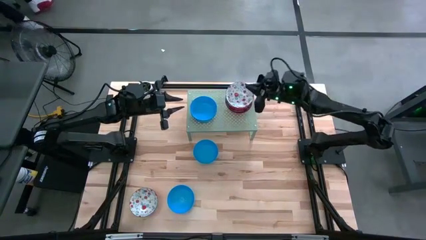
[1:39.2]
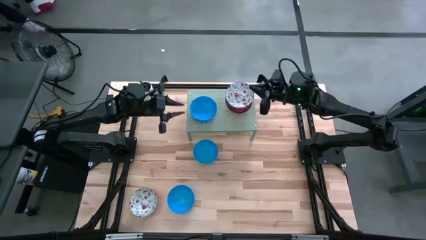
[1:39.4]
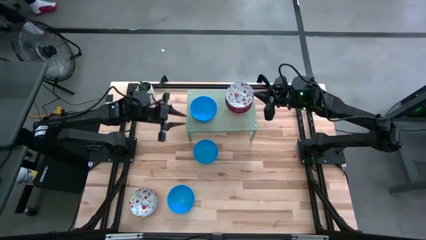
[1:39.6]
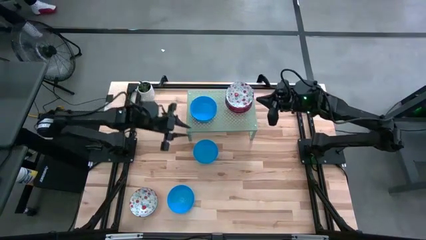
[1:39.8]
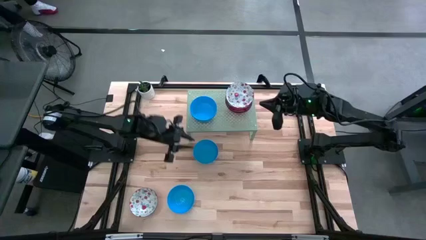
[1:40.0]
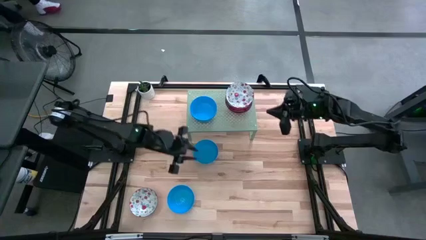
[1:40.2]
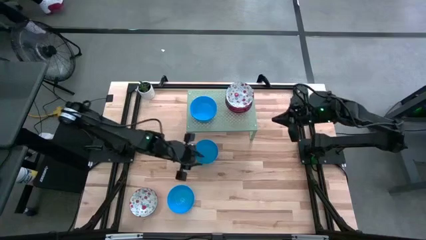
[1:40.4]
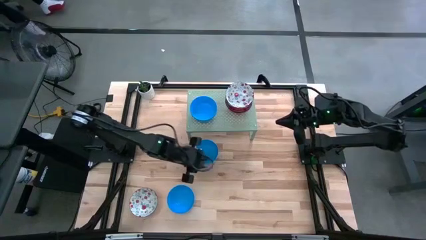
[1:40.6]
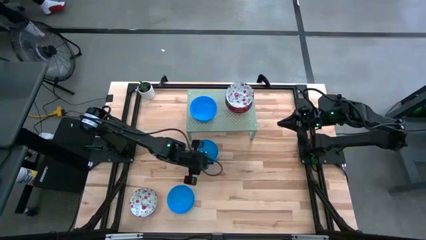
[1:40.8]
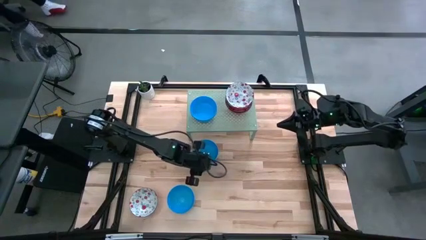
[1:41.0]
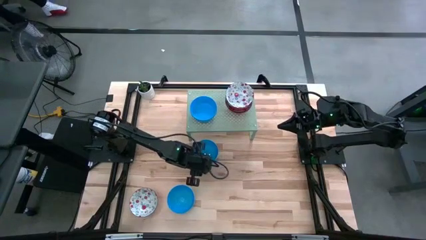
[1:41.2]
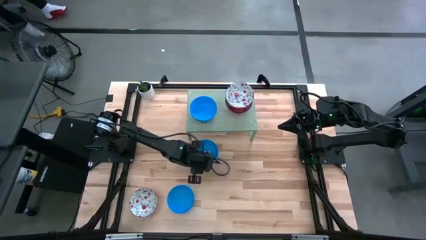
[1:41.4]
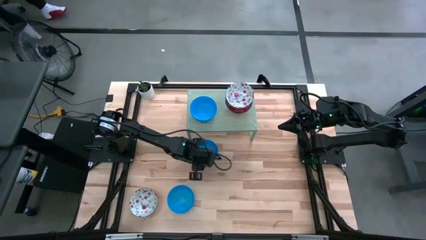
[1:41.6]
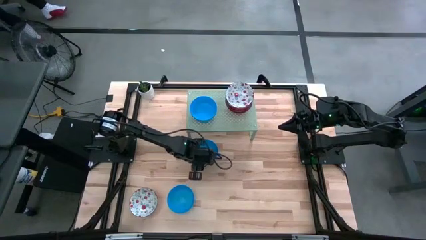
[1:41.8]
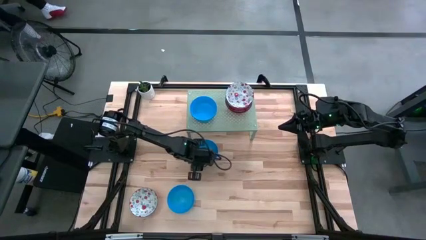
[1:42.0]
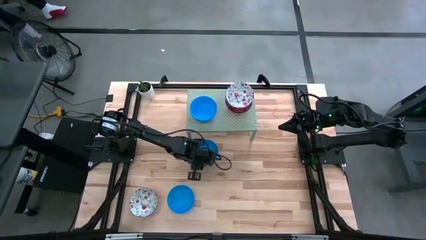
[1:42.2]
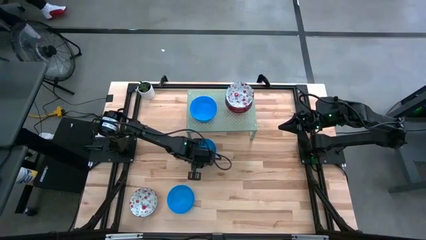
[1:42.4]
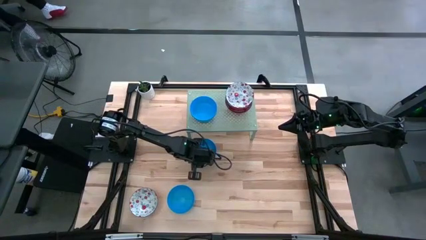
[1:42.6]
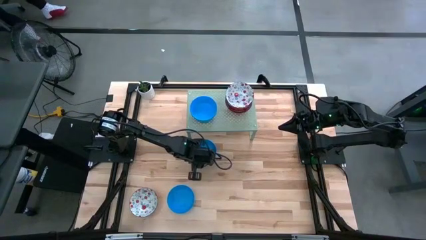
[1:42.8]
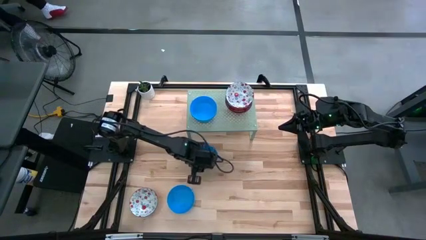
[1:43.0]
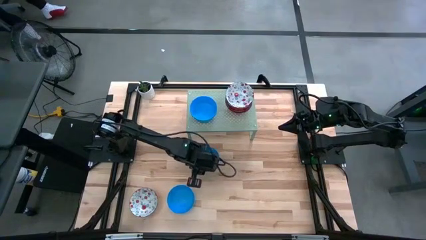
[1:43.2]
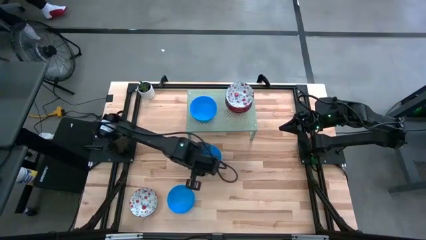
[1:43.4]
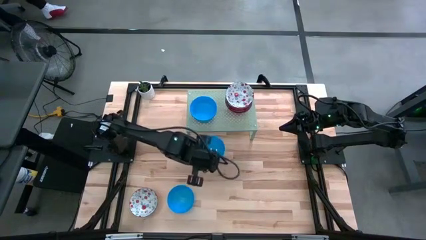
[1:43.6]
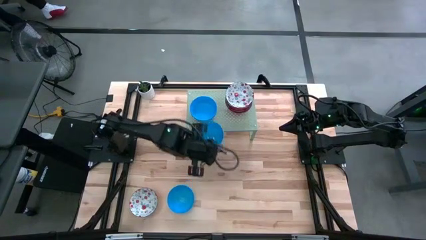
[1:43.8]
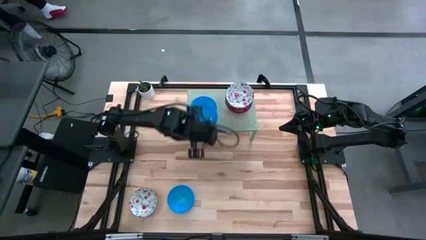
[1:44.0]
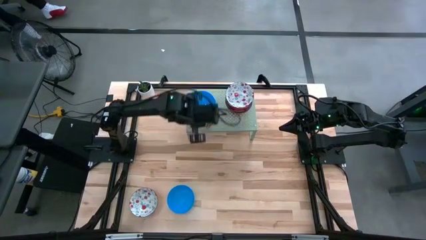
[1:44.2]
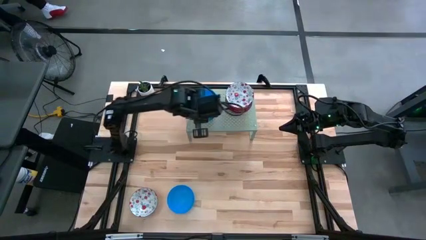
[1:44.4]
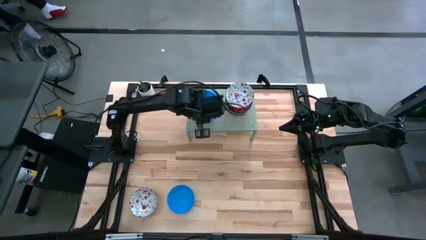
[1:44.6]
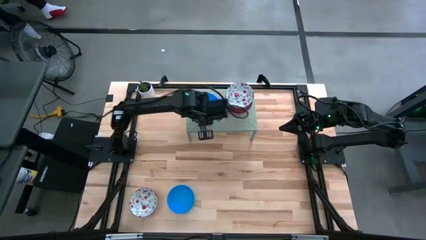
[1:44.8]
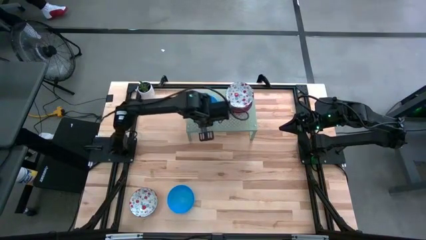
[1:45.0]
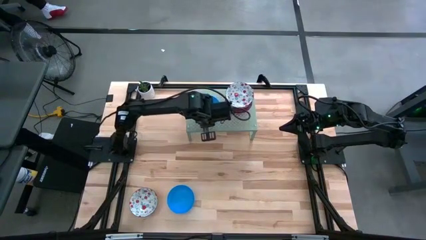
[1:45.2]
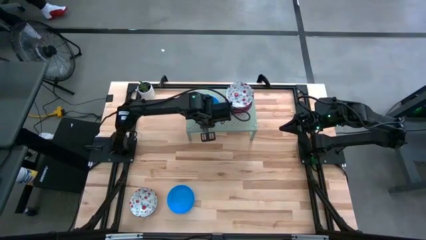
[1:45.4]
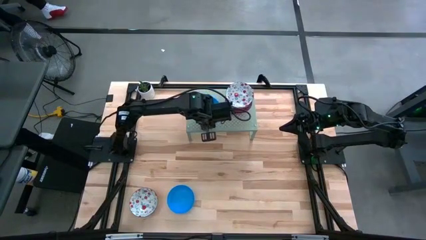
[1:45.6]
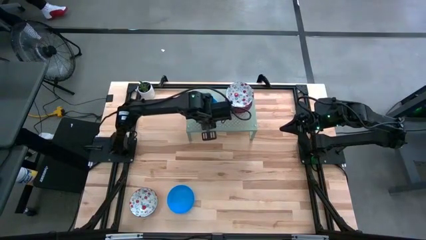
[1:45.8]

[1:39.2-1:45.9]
Task: Pick & Place Mini bowls
Stack the blue bowl on top of the blue bowls on the shelf

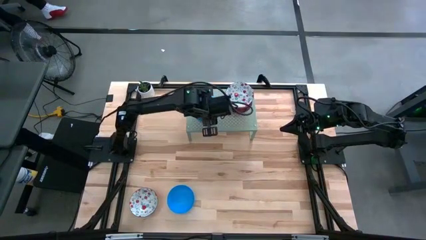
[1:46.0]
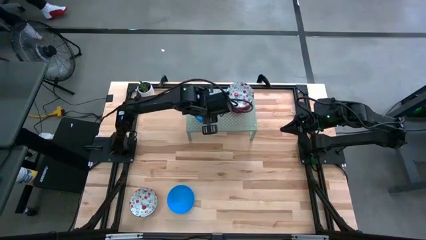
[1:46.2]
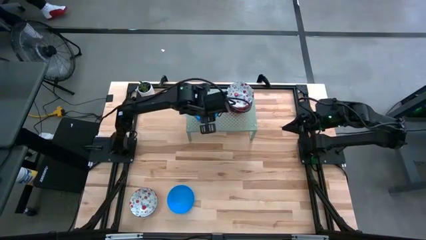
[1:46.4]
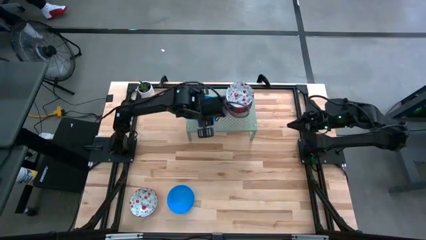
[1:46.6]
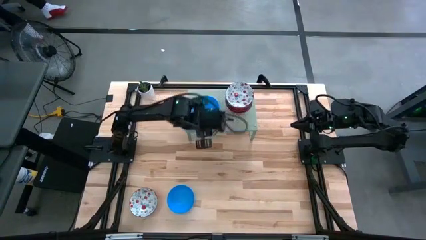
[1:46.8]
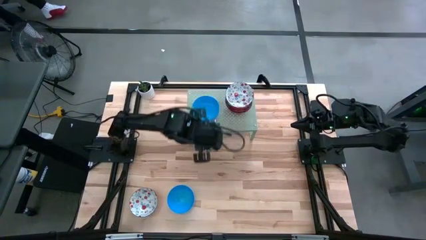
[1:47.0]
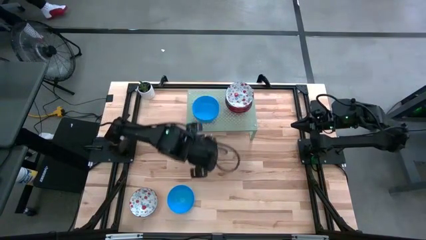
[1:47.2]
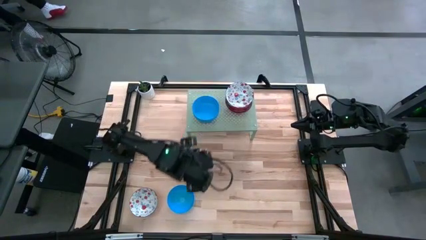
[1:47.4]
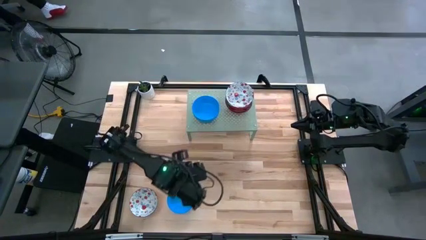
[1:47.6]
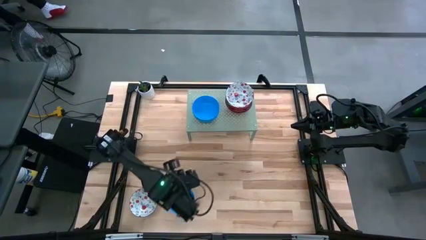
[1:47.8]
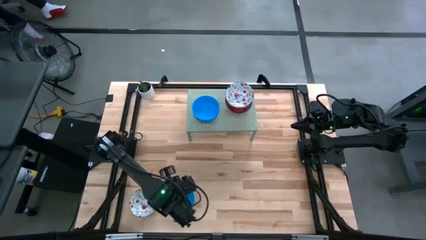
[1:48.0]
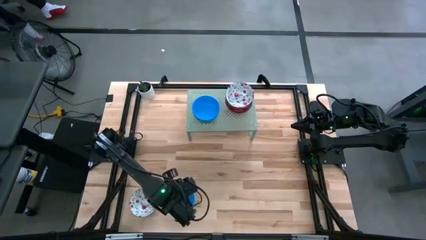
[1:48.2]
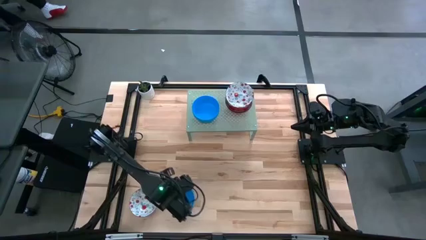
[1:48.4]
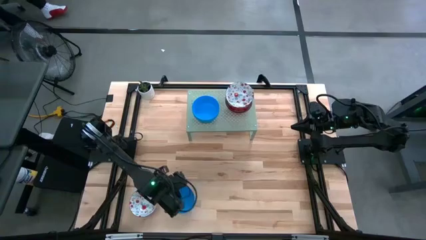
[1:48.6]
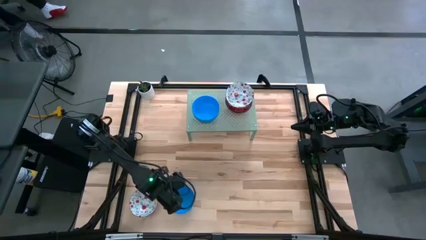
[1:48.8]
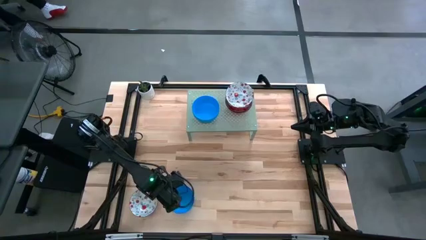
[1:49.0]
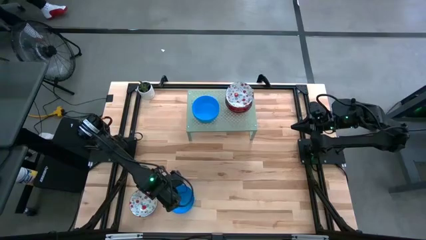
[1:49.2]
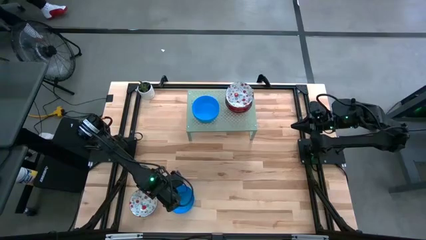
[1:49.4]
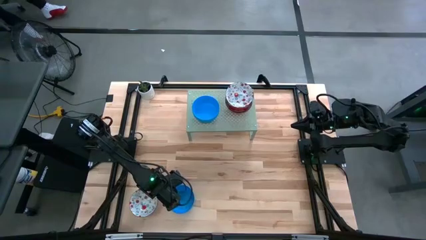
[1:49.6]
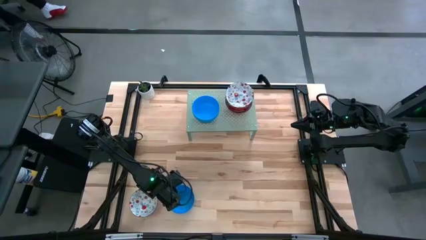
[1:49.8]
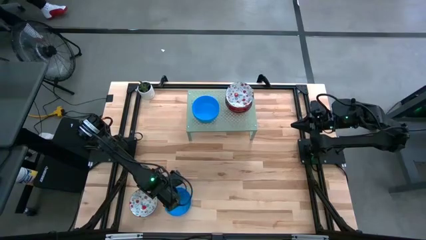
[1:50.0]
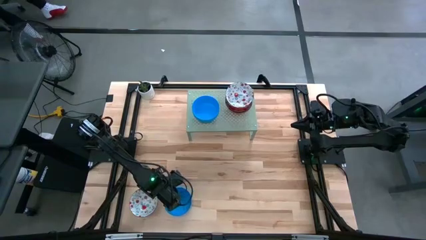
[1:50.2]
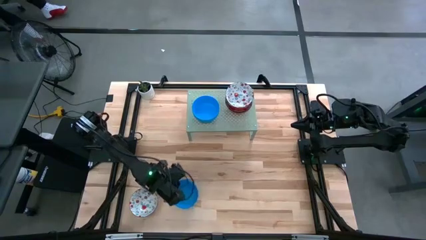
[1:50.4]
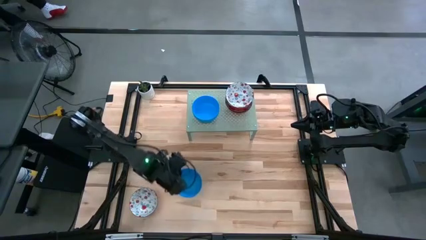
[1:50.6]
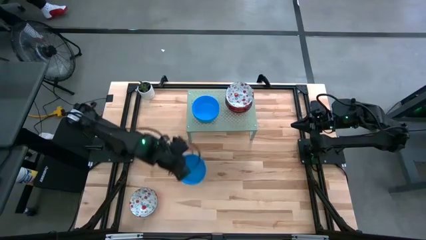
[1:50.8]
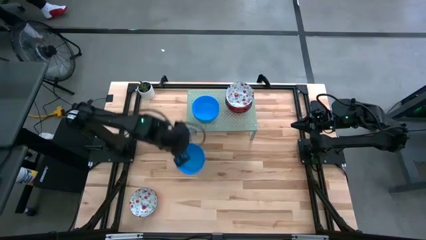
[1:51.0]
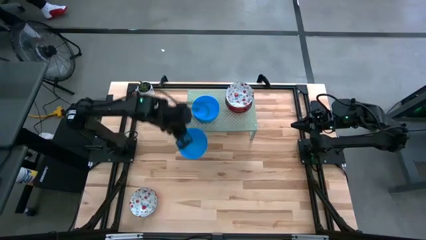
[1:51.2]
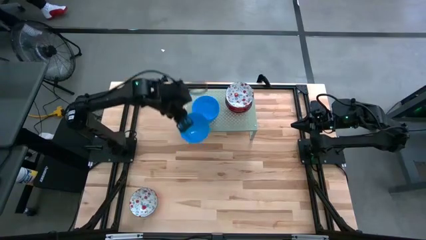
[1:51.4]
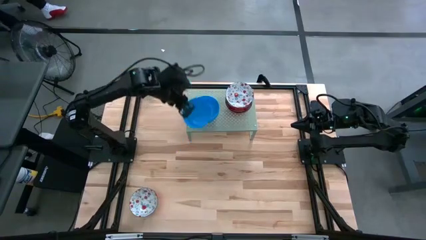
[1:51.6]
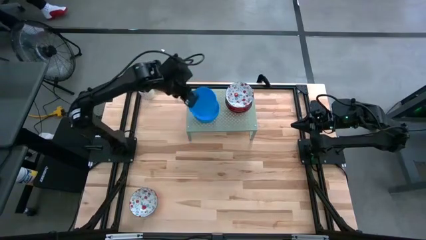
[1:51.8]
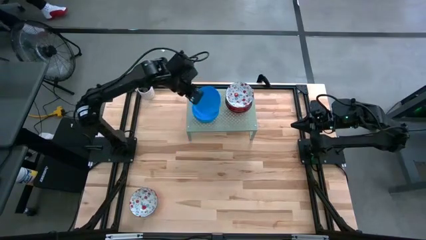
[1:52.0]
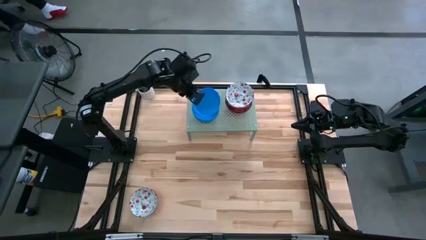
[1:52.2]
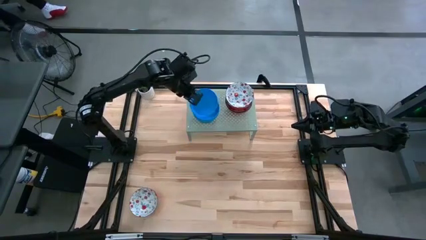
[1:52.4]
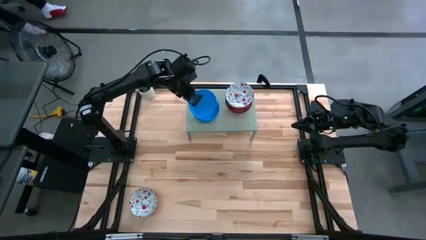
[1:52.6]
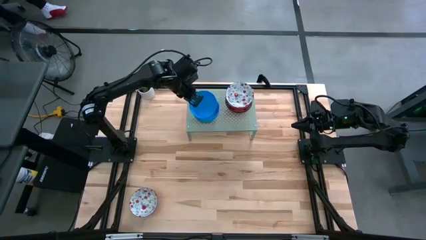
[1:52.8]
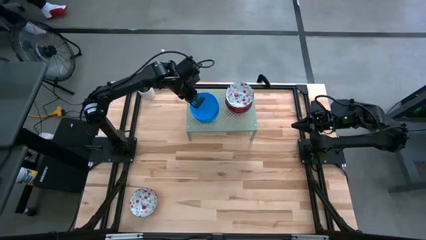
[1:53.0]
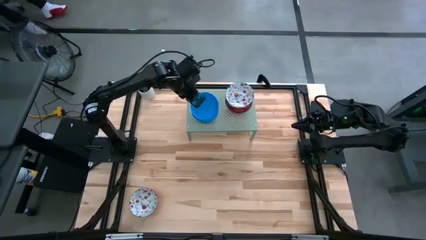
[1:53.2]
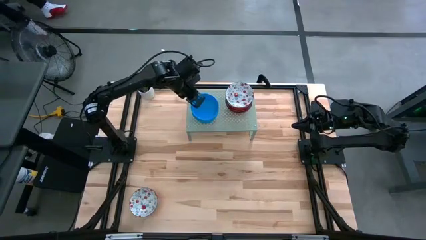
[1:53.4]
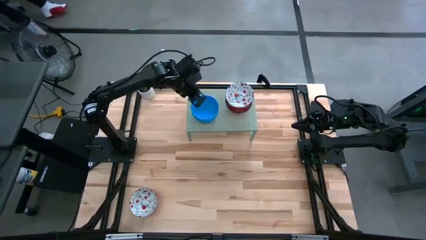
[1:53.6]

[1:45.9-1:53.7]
Stack the blue bowl on top of the blue bowls on the shelf

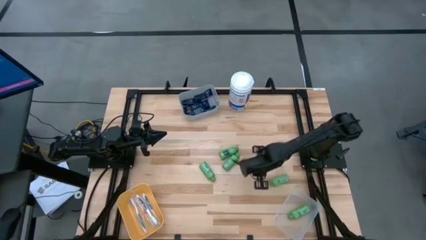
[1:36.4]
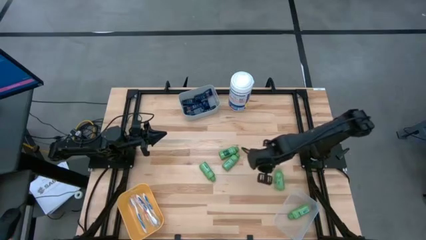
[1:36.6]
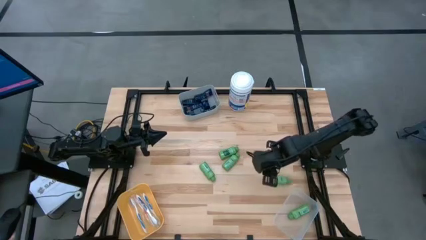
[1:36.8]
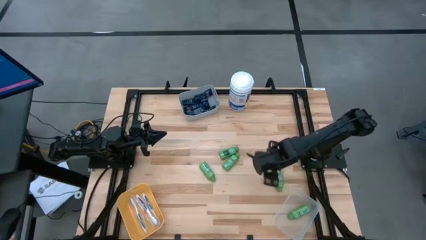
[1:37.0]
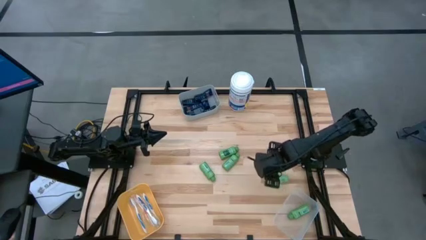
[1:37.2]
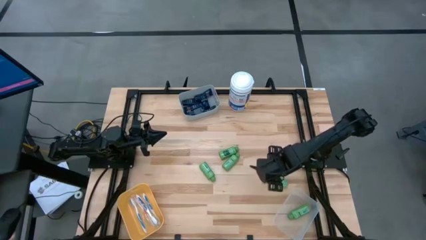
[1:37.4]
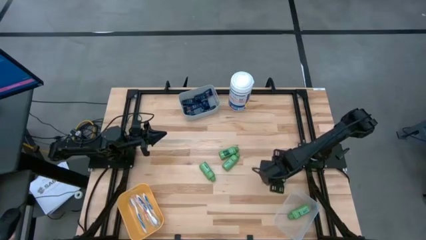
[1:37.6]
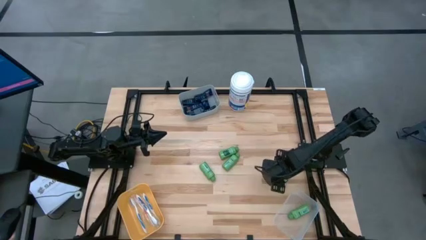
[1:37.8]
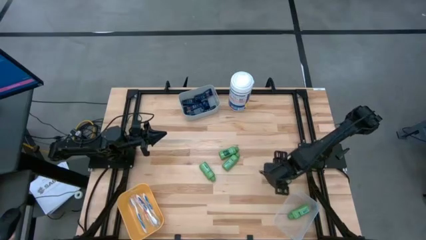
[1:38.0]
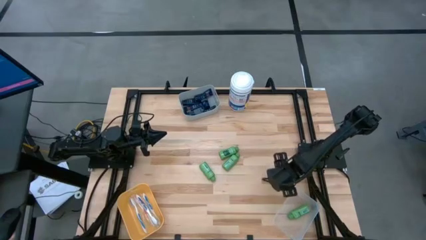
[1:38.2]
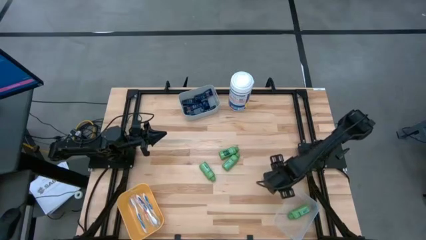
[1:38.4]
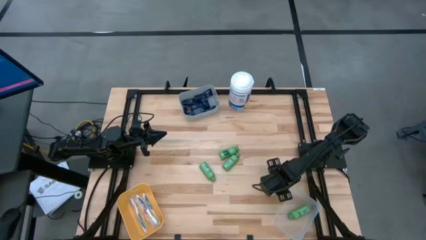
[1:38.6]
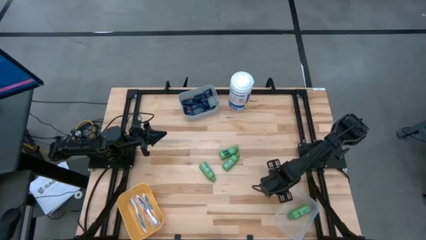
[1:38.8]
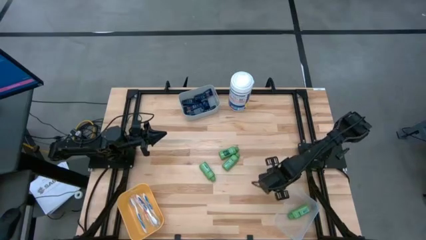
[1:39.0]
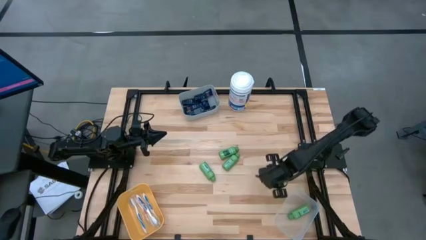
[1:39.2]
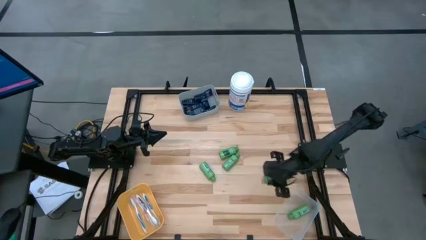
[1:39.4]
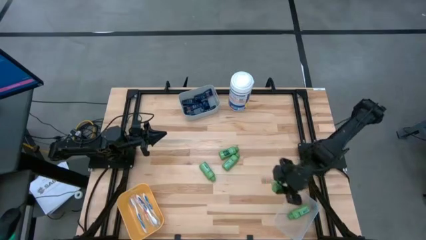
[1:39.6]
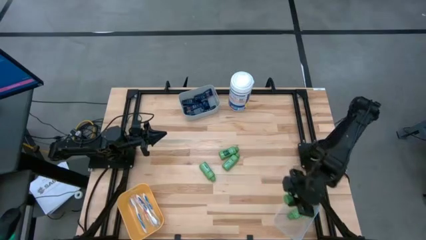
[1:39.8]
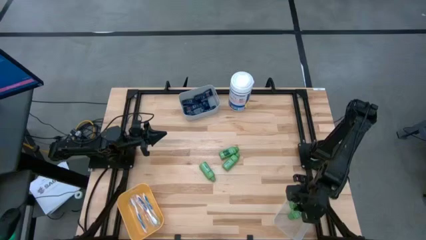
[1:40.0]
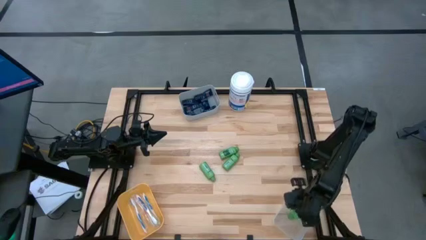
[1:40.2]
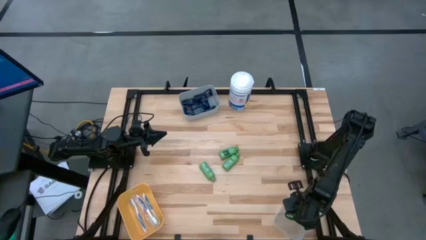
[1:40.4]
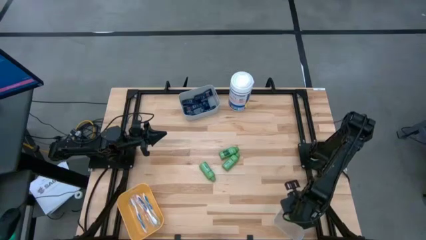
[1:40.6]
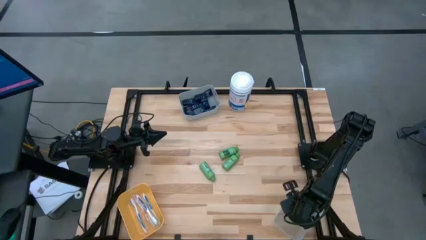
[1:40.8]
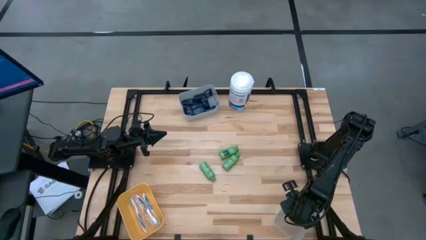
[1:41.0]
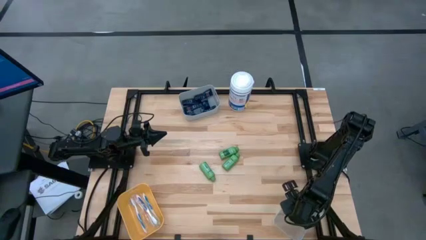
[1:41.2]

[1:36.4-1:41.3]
Task: Pick & Place Travel size toiletries
Put the green shampoo into the transparent bin
